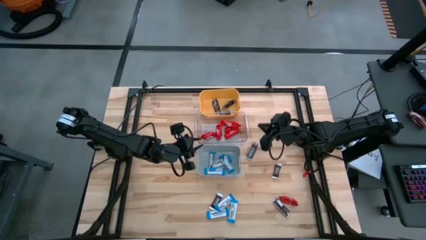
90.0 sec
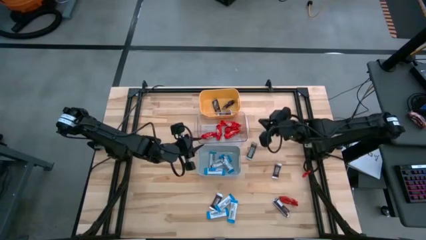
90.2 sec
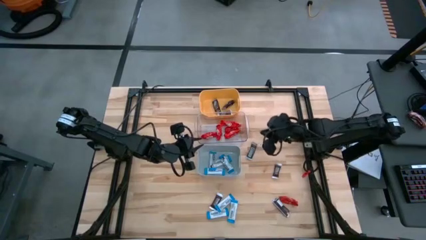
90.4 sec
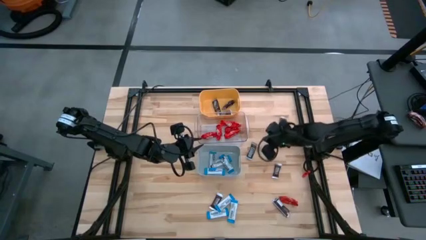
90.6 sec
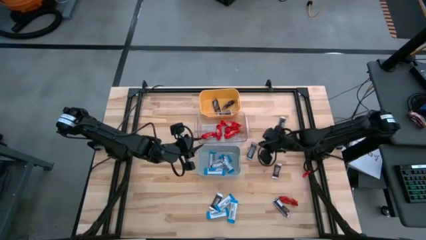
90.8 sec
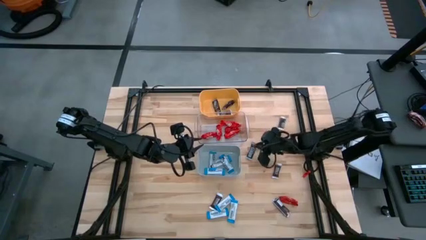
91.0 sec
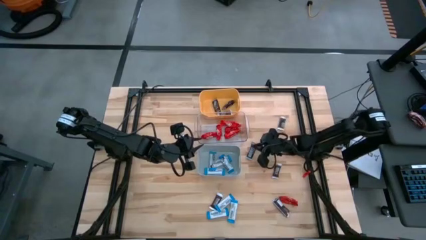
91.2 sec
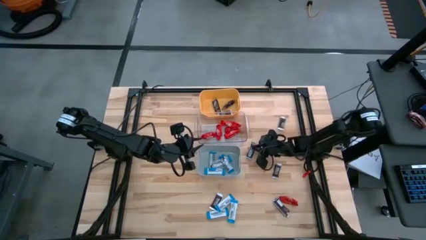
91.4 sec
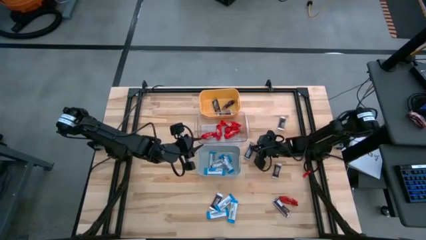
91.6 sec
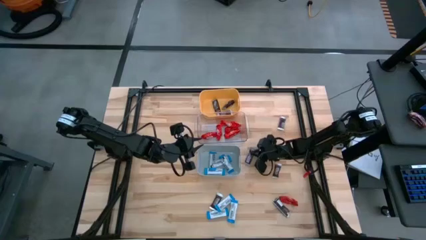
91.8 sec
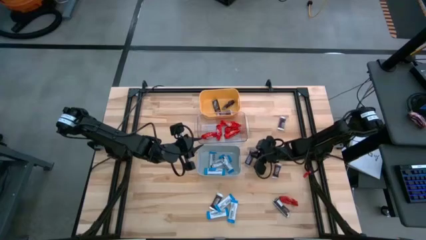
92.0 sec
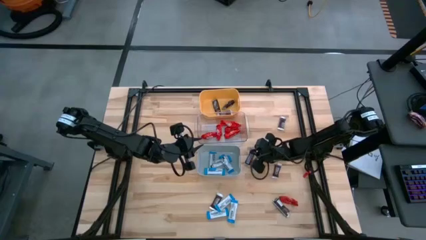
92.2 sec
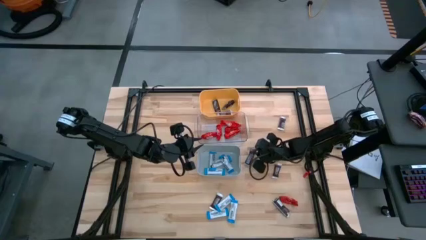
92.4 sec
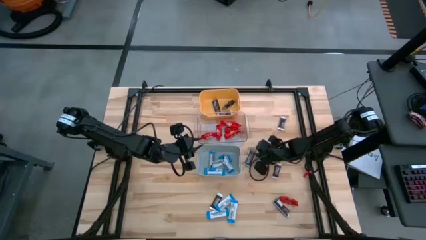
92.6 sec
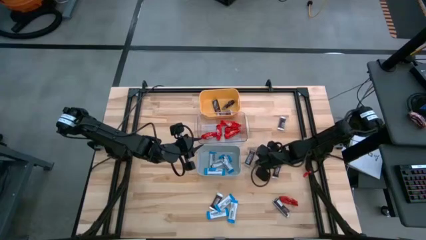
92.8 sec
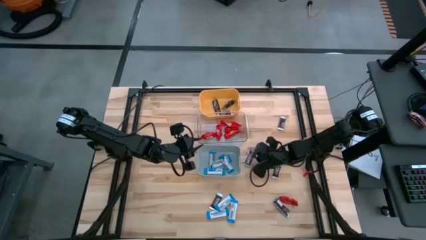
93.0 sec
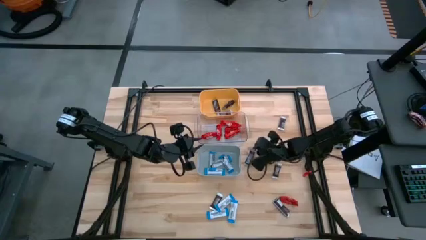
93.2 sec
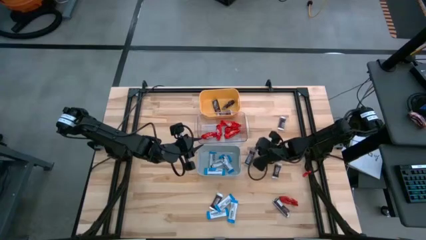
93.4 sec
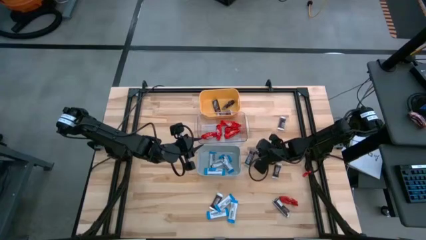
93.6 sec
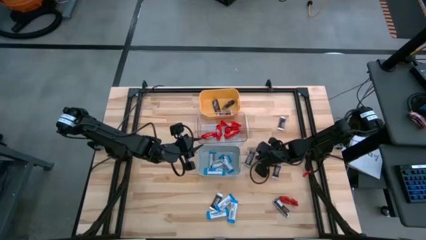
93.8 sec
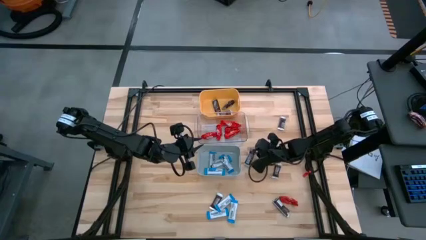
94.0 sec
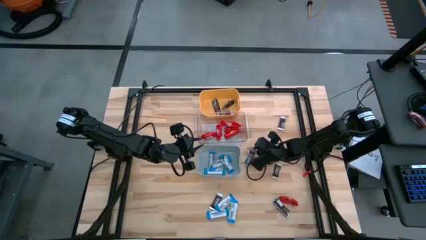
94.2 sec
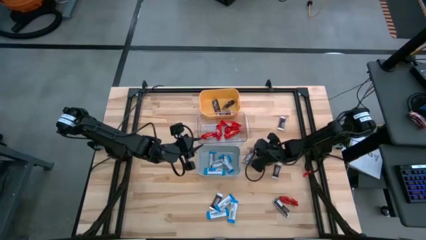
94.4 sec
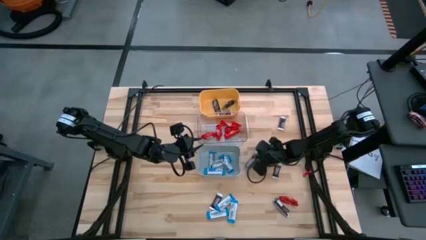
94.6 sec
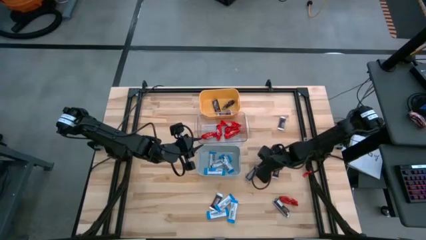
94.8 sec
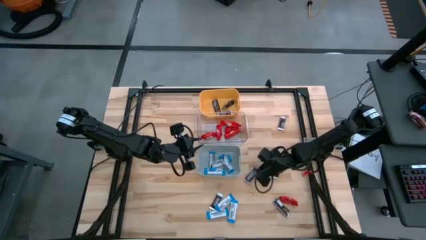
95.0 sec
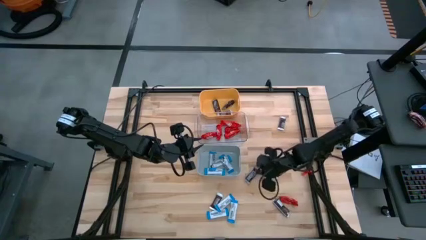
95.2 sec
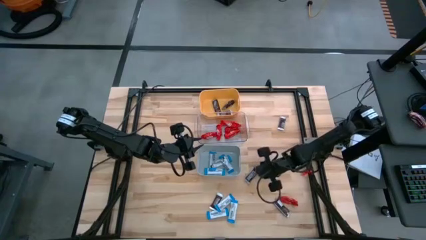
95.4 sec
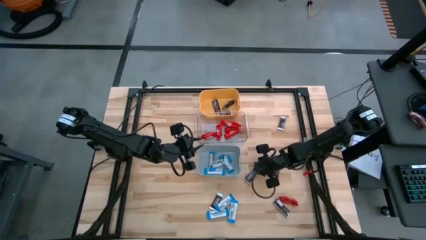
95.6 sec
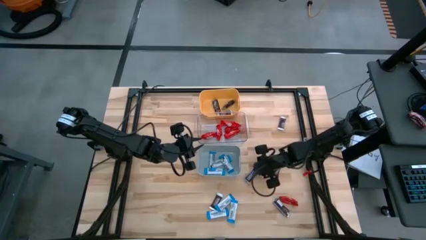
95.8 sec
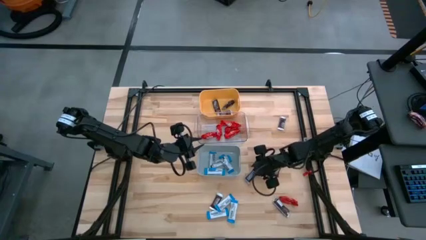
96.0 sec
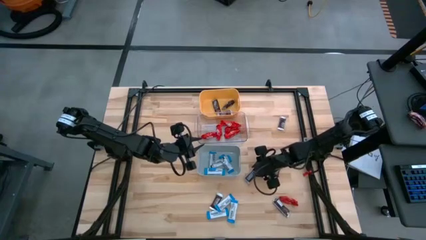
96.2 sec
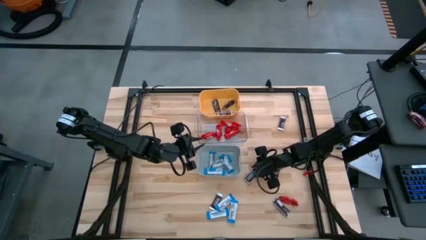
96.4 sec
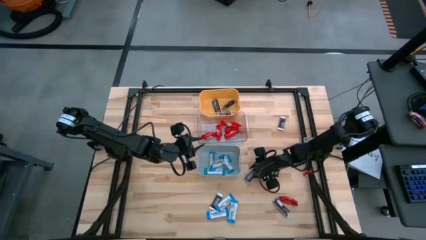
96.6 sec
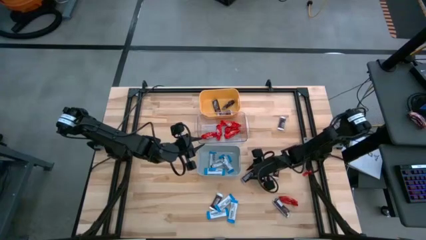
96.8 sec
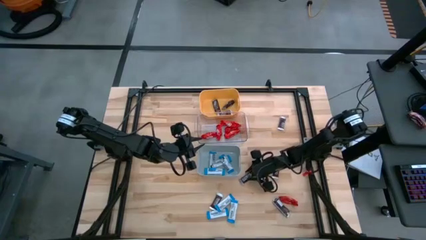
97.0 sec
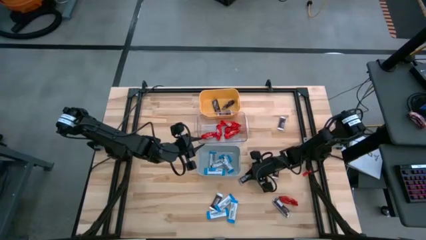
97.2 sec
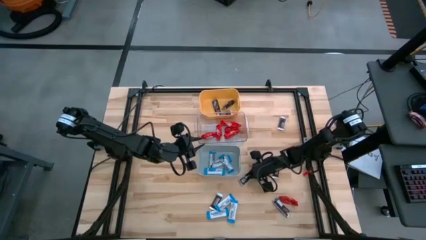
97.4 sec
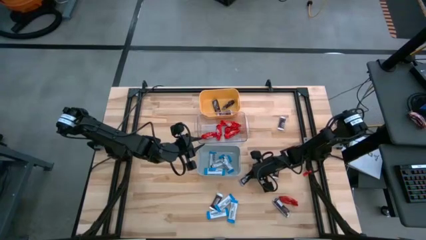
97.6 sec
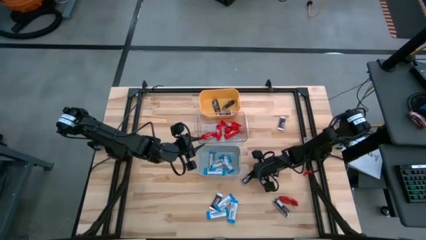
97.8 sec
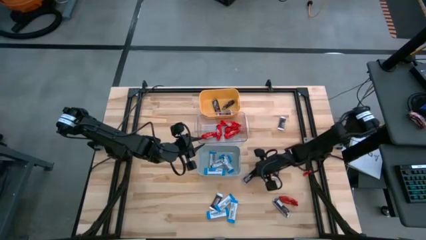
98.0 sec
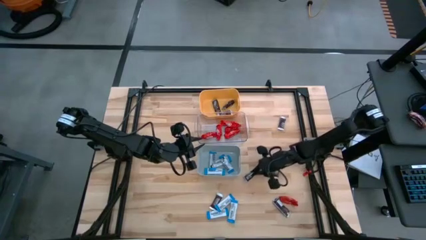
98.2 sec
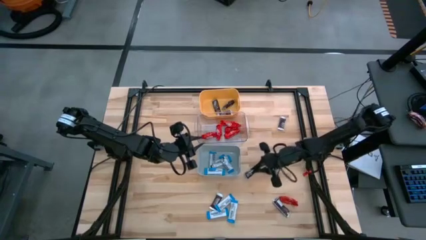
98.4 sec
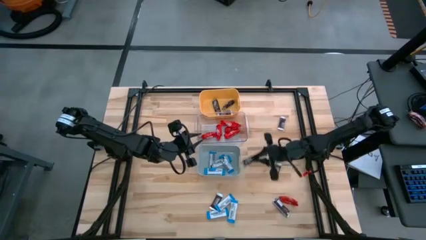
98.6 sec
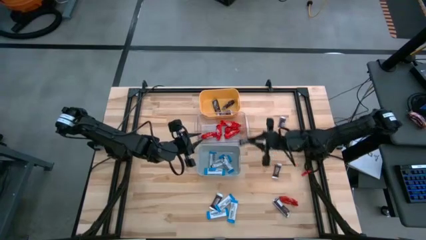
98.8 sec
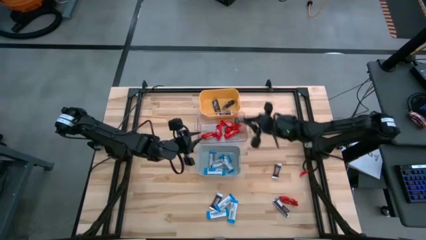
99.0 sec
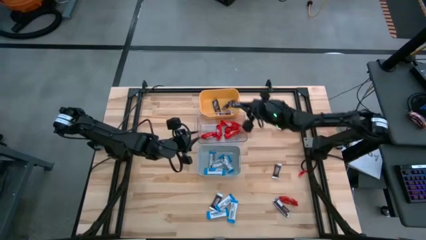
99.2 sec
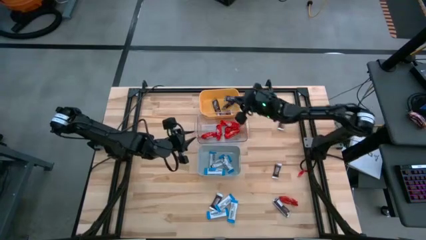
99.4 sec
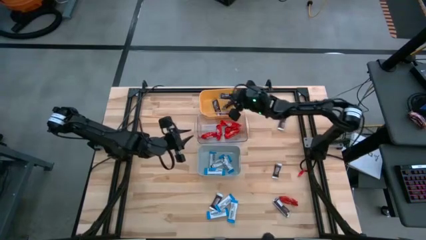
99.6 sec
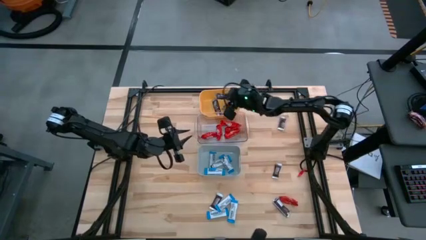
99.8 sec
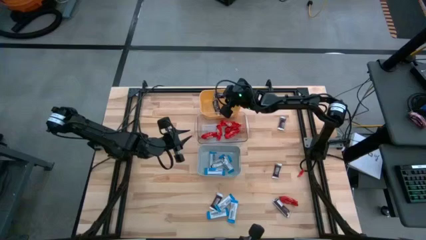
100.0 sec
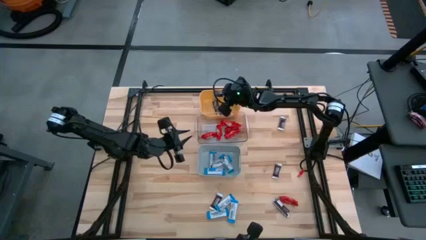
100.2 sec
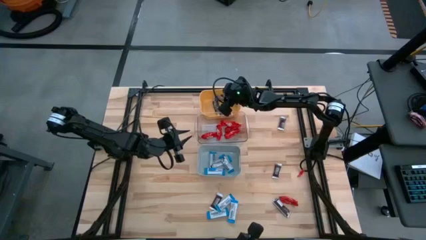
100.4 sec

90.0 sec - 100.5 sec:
Task: Organize candy in baskets
Put the brown chocolate bar into the yellow bin

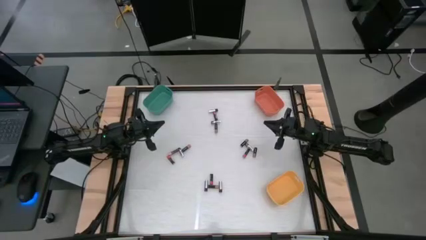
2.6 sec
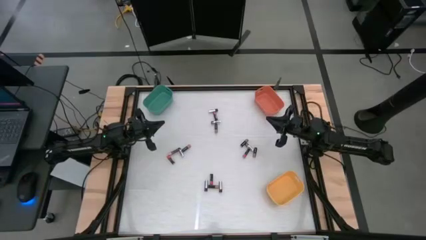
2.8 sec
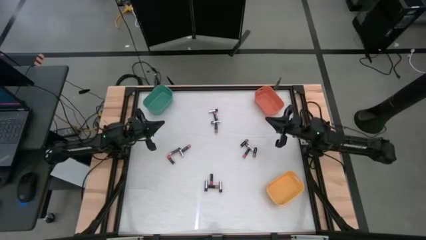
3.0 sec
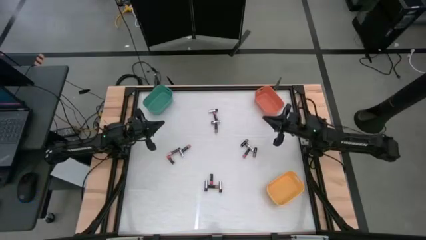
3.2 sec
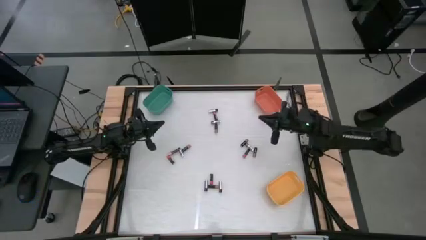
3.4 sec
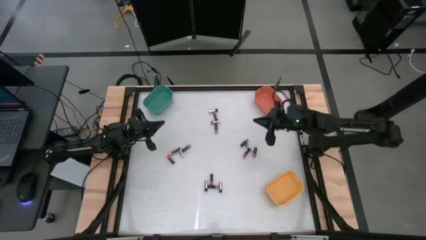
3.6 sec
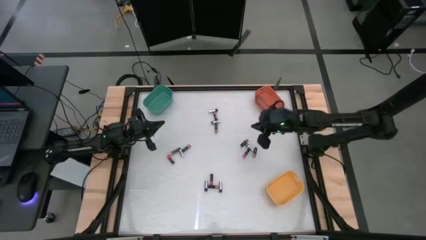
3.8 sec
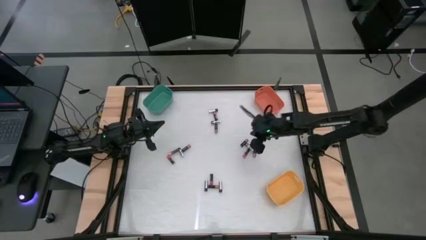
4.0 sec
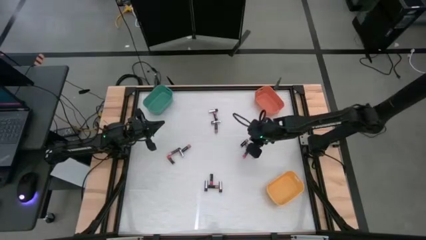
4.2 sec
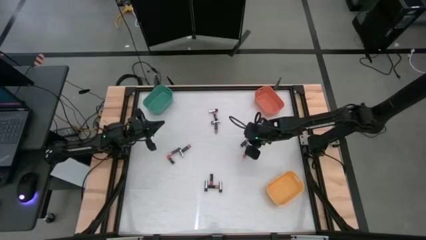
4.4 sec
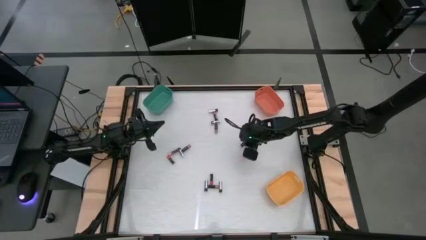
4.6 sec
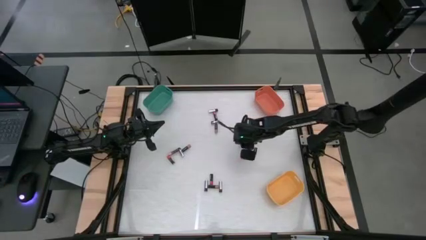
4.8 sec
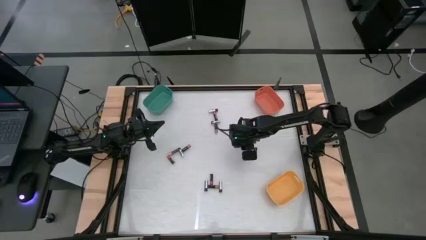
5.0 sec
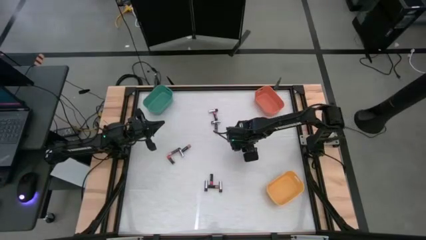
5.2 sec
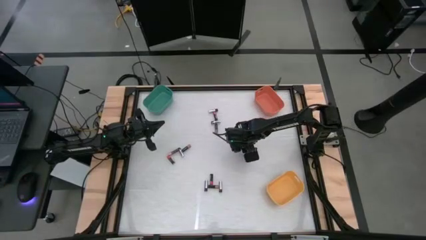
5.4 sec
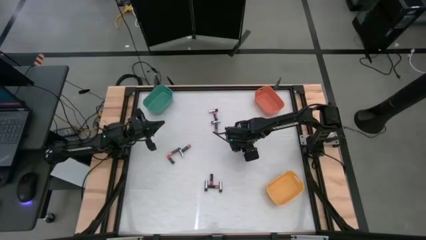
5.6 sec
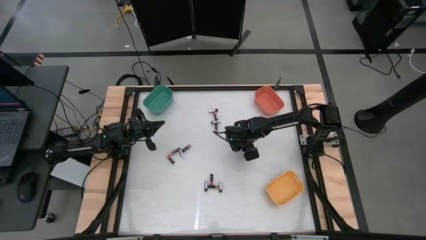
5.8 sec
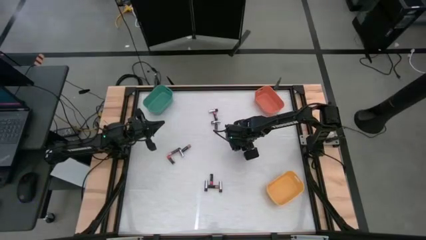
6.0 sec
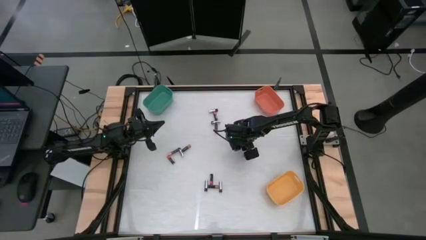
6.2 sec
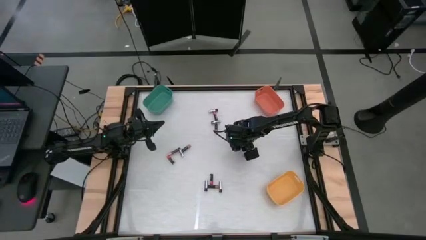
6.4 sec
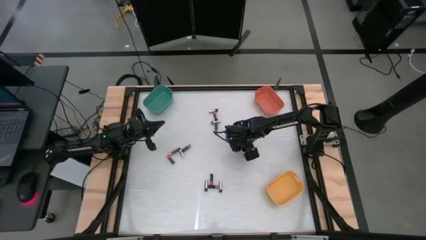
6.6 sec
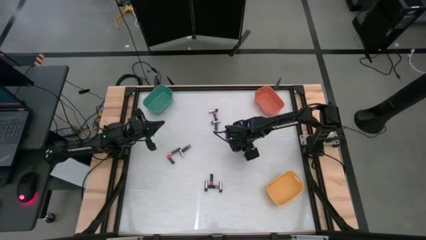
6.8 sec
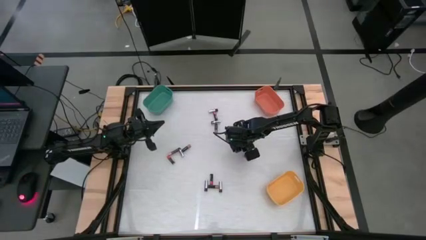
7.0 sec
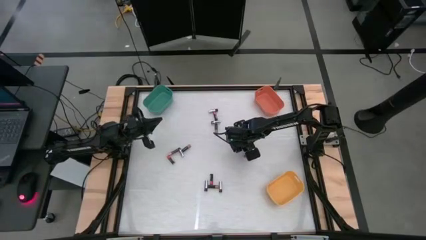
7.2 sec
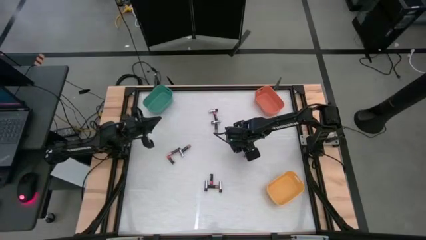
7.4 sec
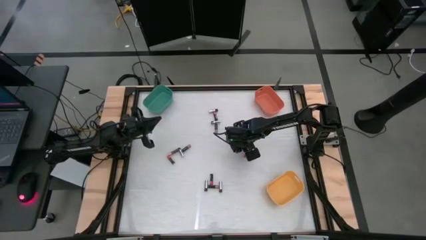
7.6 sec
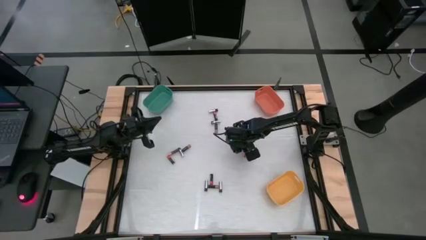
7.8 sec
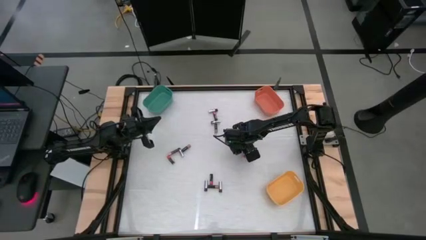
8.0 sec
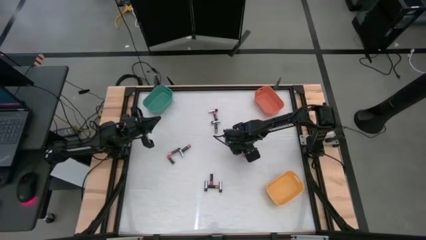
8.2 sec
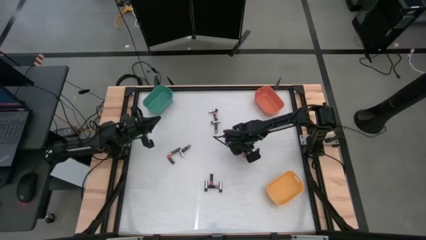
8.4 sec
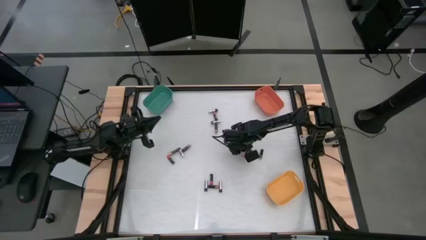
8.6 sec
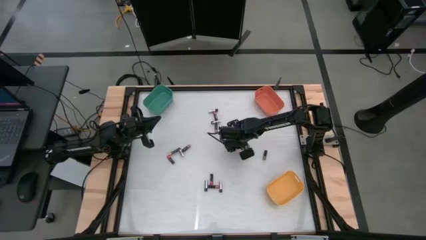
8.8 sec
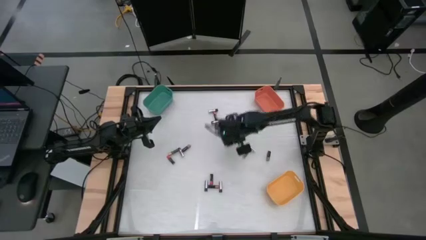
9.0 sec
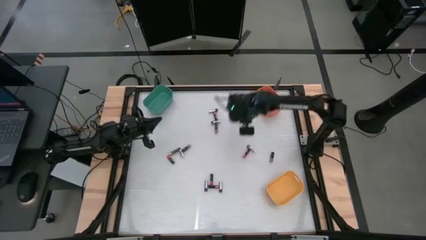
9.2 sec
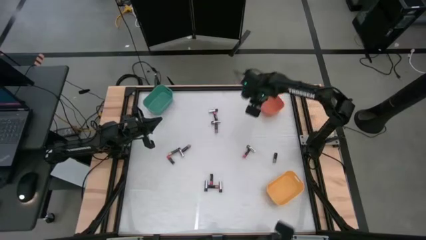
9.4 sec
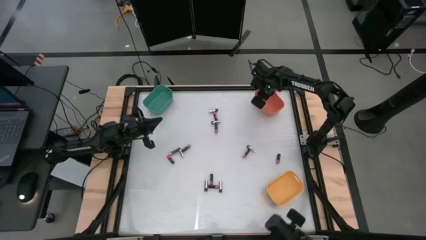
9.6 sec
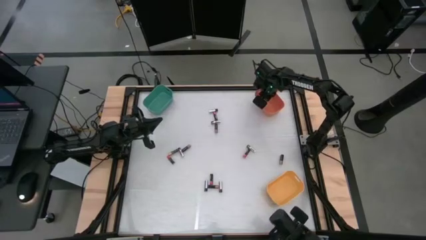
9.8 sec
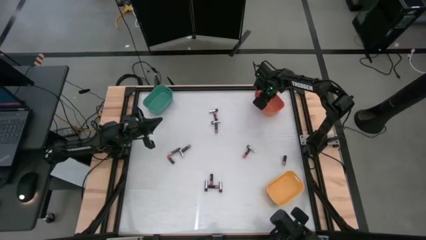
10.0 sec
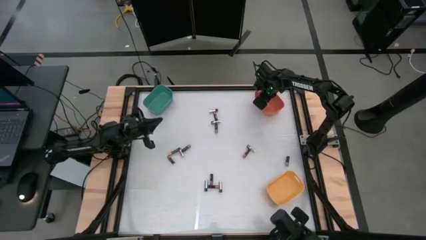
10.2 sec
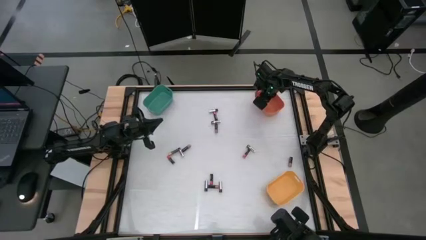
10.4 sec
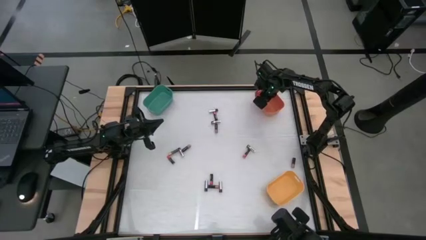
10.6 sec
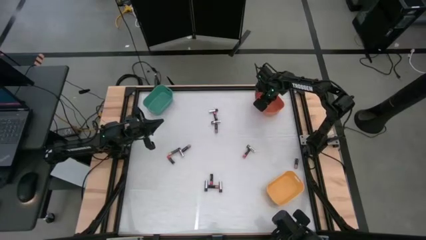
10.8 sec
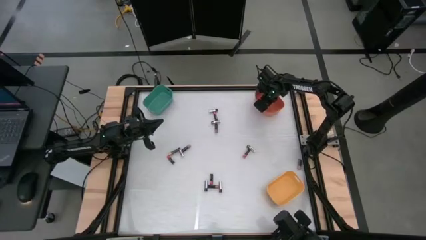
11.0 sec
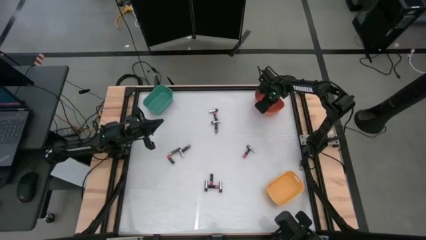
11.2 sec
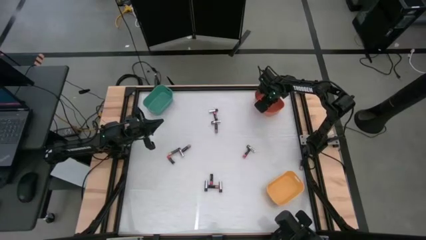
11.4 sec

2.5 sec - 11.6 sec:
Task: Sort batteries
Put the black battery into the orange bin
